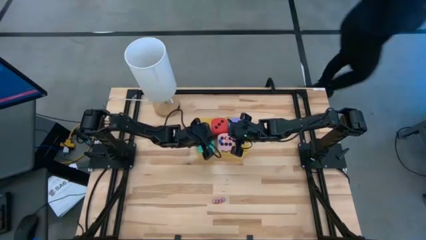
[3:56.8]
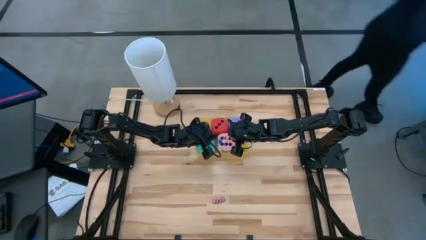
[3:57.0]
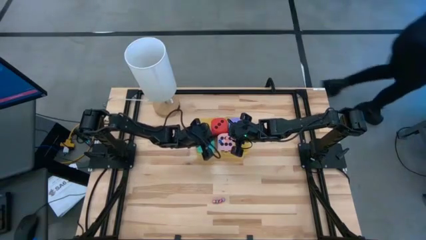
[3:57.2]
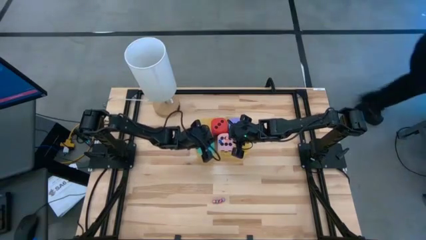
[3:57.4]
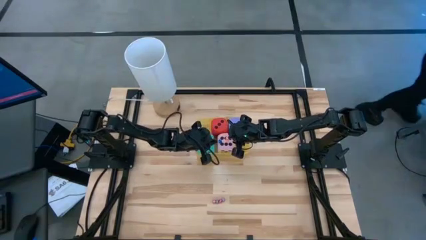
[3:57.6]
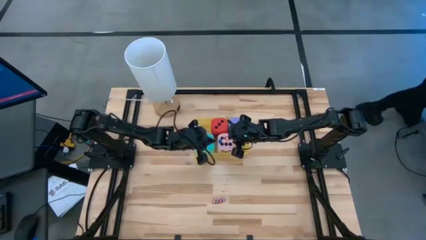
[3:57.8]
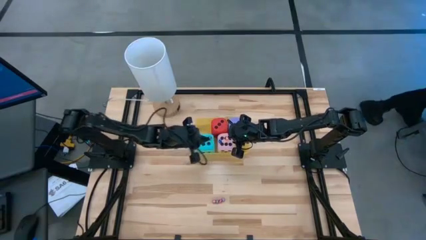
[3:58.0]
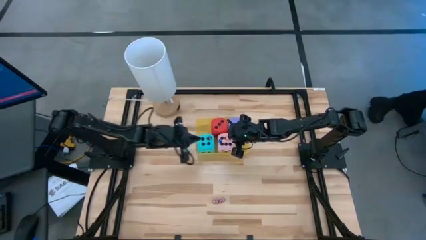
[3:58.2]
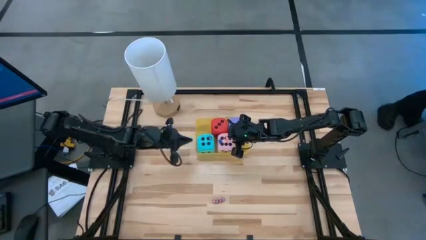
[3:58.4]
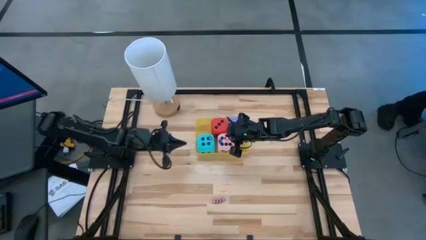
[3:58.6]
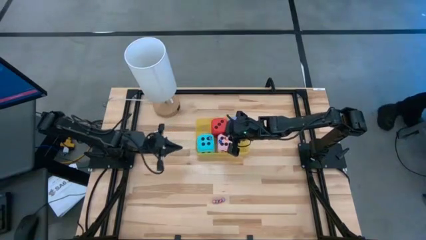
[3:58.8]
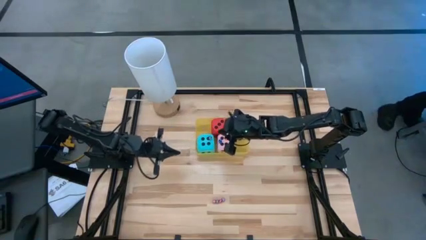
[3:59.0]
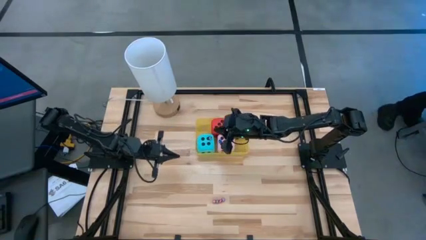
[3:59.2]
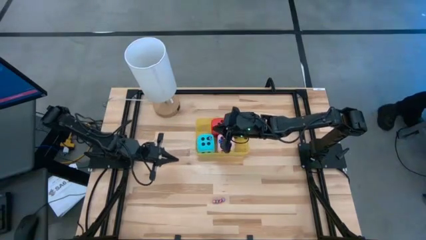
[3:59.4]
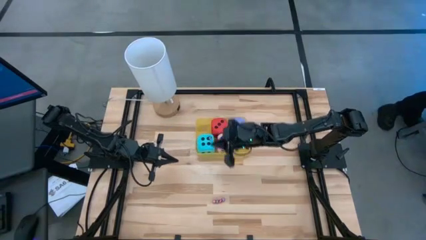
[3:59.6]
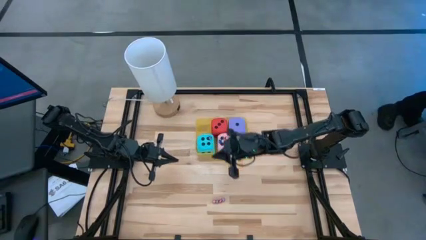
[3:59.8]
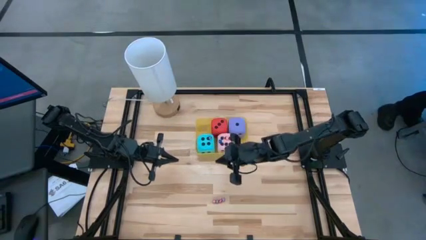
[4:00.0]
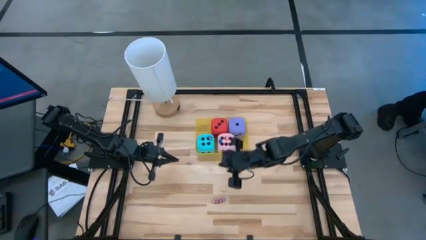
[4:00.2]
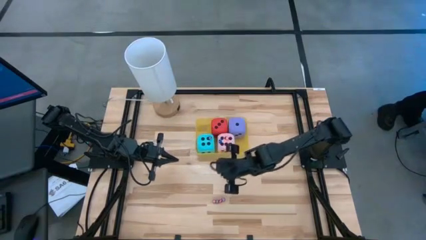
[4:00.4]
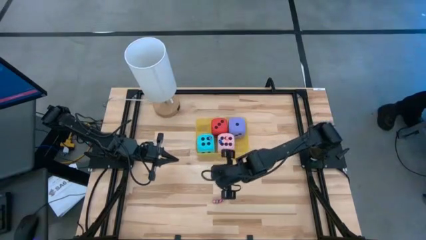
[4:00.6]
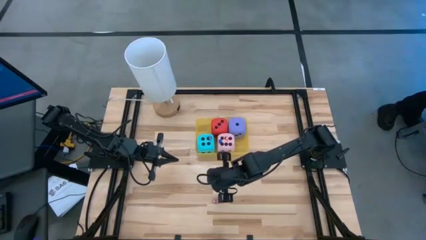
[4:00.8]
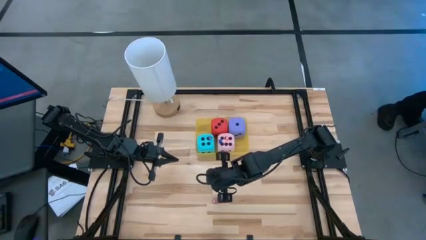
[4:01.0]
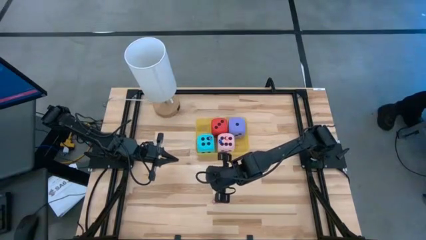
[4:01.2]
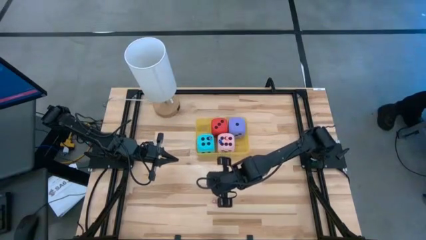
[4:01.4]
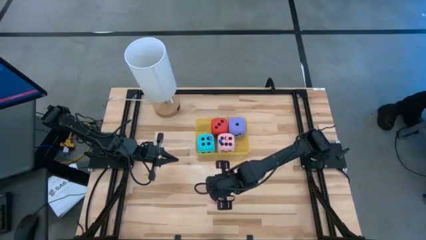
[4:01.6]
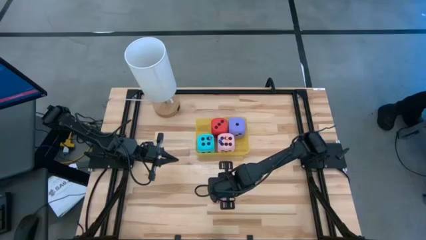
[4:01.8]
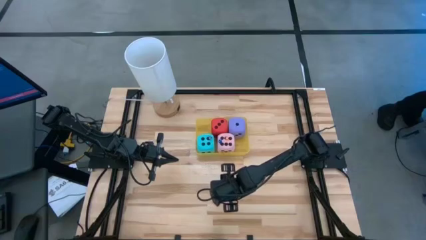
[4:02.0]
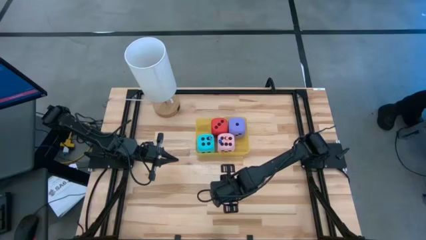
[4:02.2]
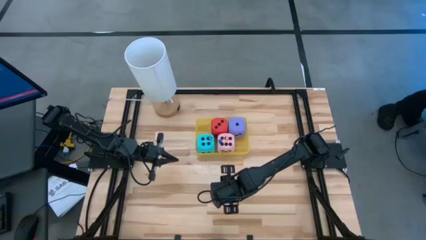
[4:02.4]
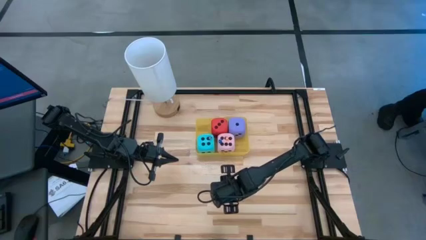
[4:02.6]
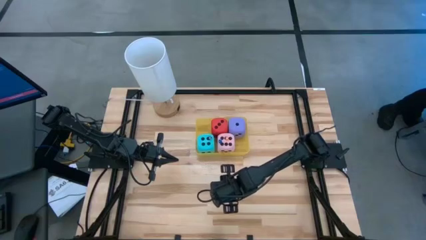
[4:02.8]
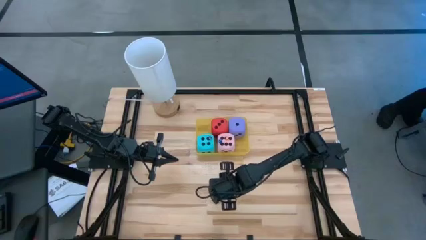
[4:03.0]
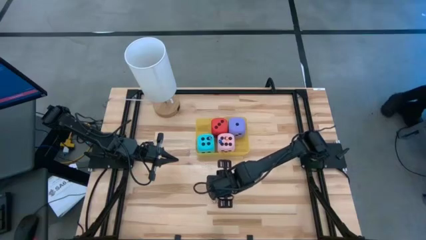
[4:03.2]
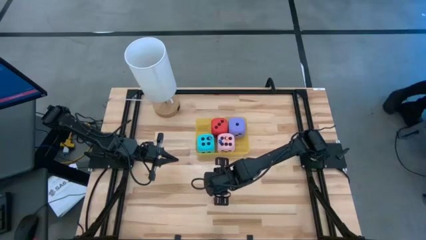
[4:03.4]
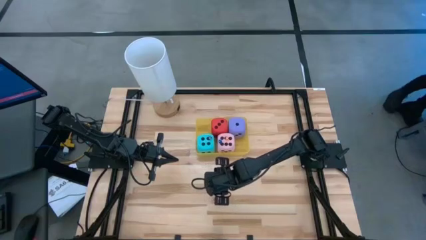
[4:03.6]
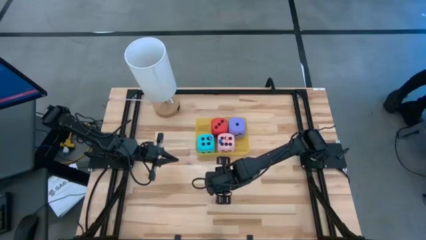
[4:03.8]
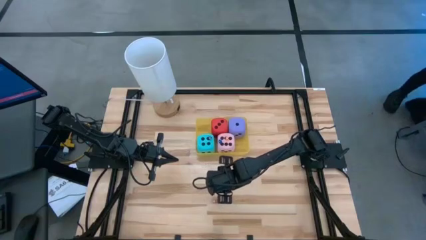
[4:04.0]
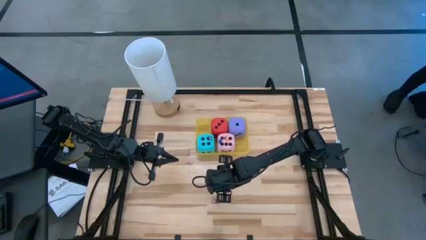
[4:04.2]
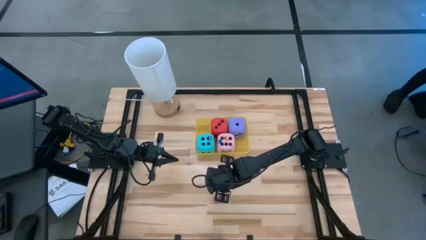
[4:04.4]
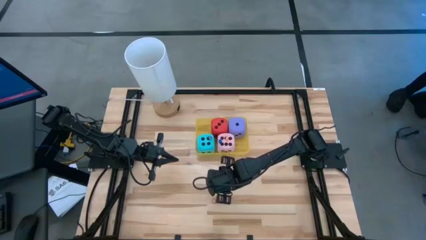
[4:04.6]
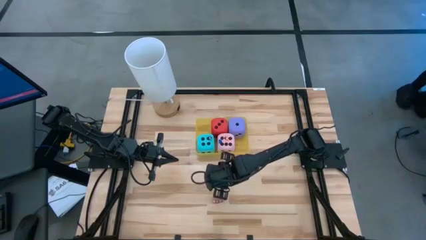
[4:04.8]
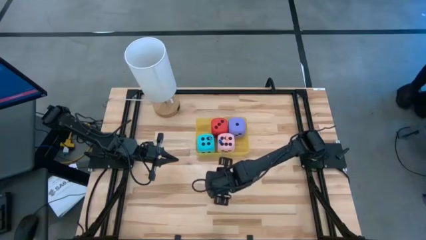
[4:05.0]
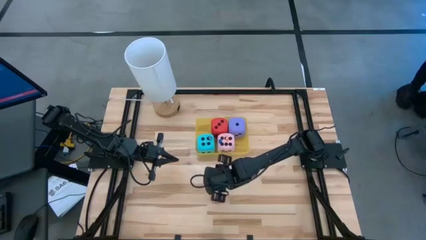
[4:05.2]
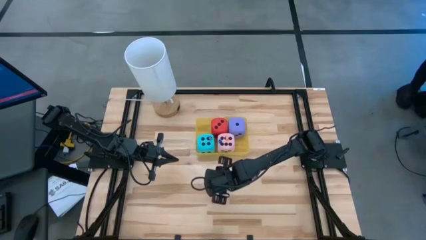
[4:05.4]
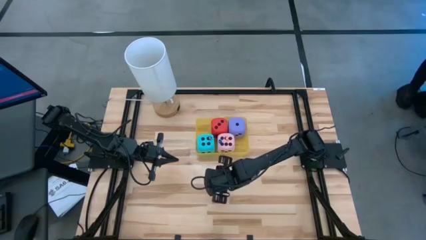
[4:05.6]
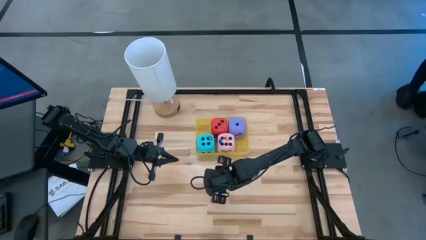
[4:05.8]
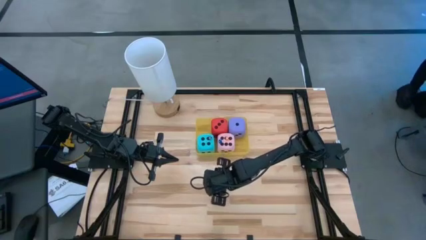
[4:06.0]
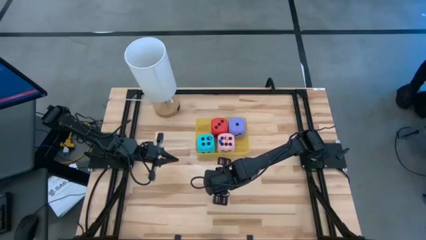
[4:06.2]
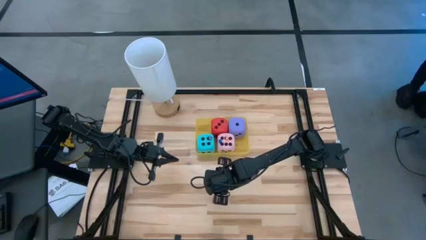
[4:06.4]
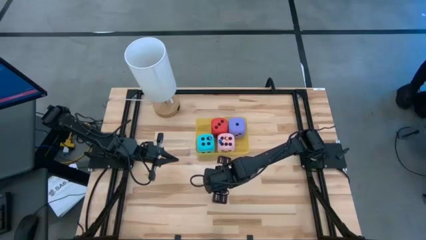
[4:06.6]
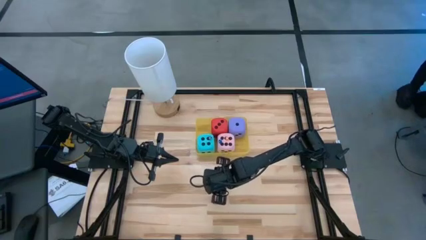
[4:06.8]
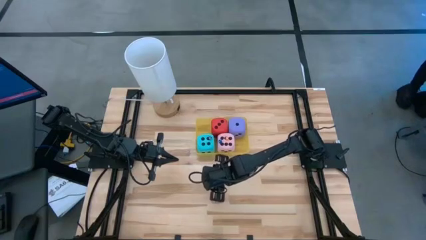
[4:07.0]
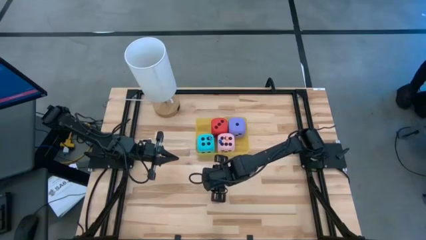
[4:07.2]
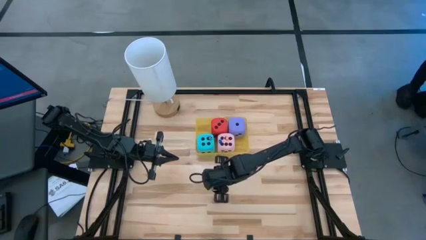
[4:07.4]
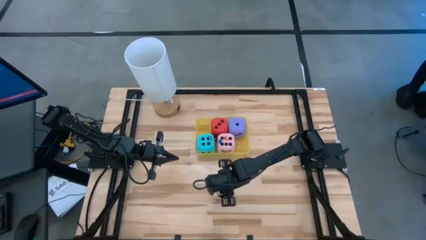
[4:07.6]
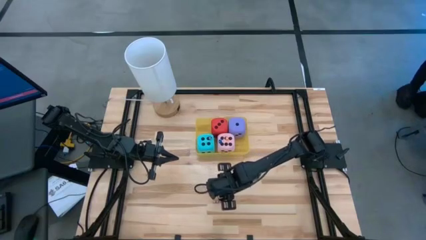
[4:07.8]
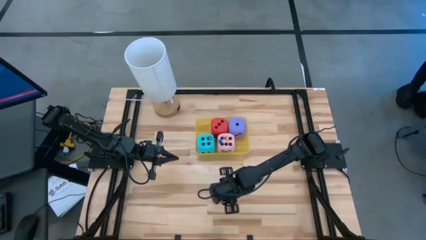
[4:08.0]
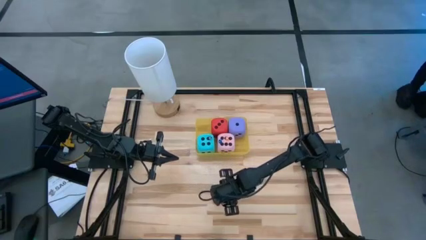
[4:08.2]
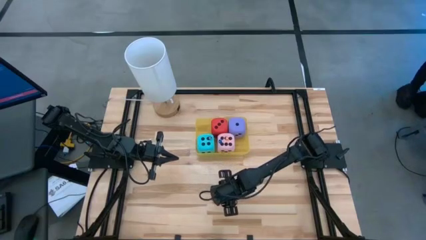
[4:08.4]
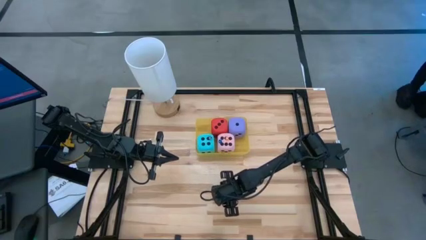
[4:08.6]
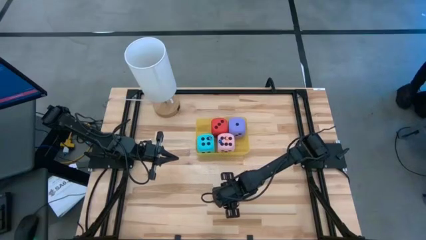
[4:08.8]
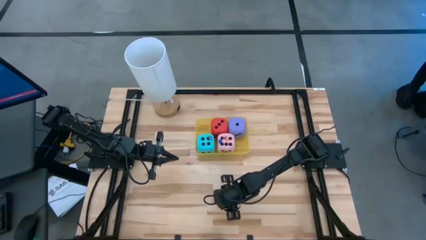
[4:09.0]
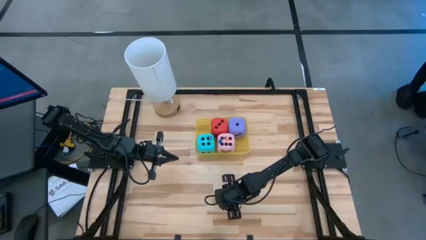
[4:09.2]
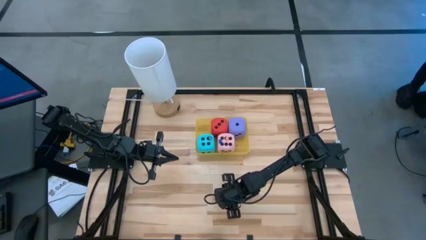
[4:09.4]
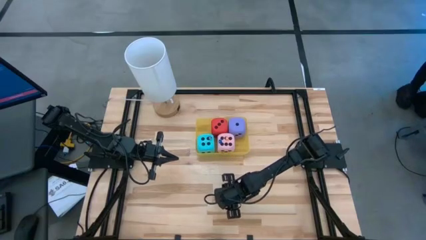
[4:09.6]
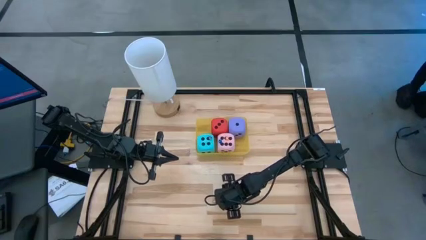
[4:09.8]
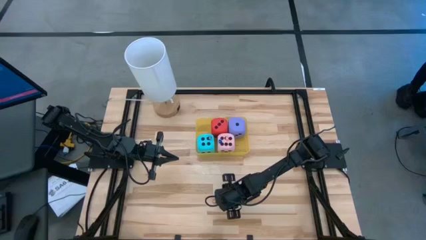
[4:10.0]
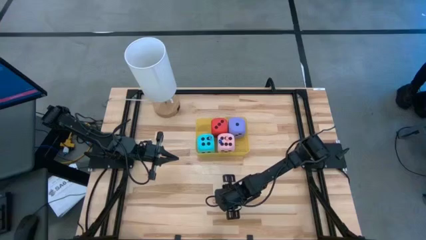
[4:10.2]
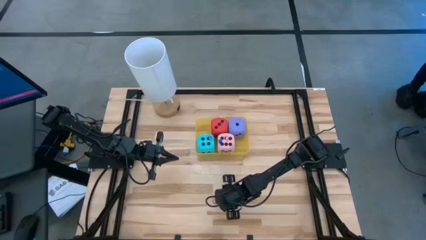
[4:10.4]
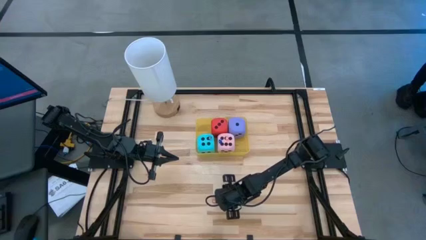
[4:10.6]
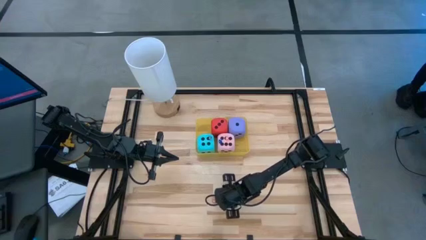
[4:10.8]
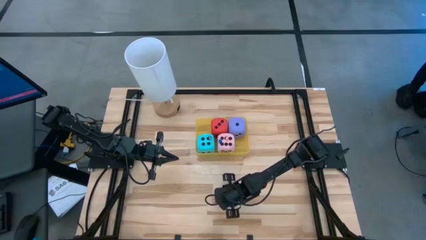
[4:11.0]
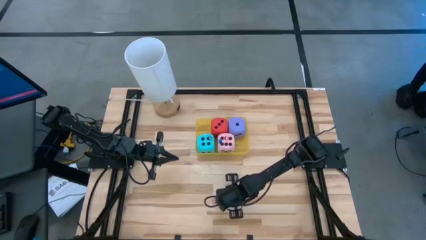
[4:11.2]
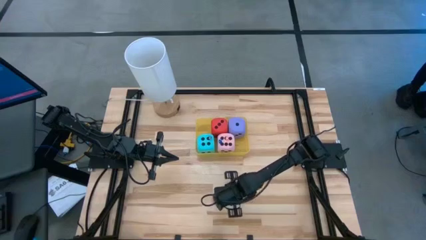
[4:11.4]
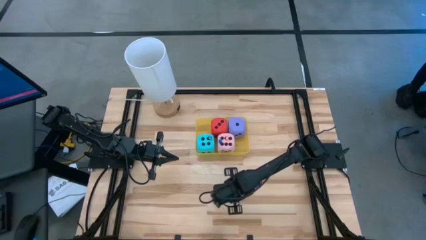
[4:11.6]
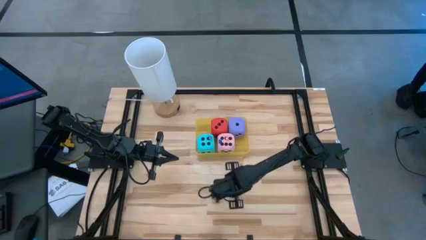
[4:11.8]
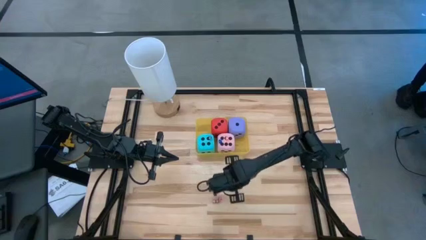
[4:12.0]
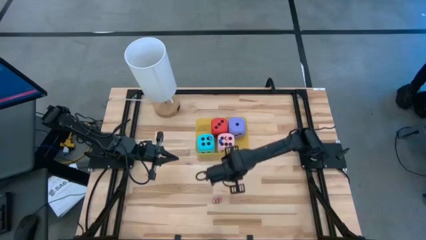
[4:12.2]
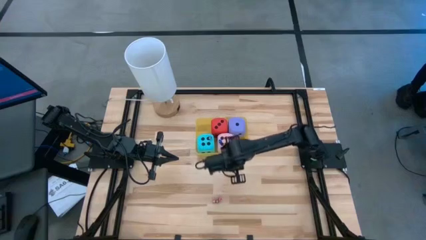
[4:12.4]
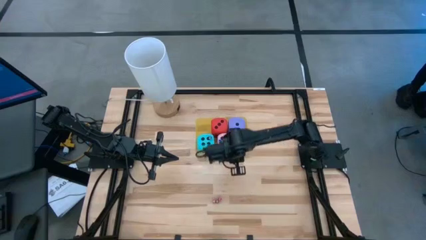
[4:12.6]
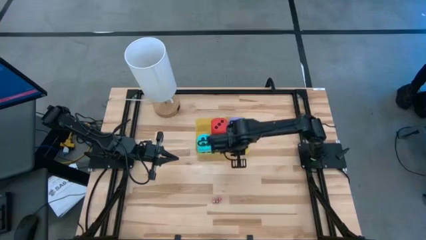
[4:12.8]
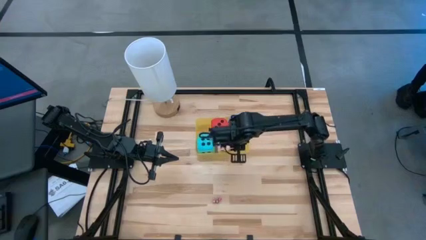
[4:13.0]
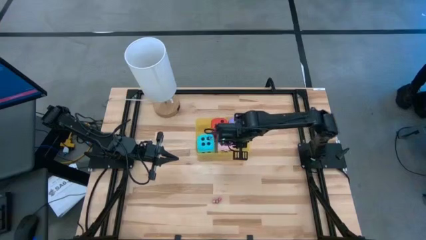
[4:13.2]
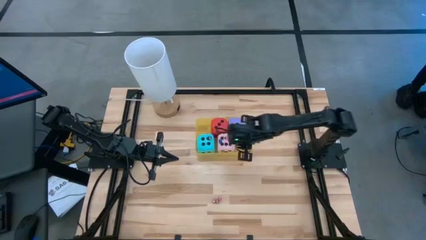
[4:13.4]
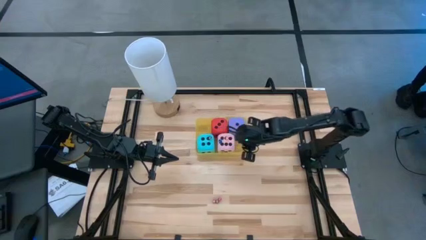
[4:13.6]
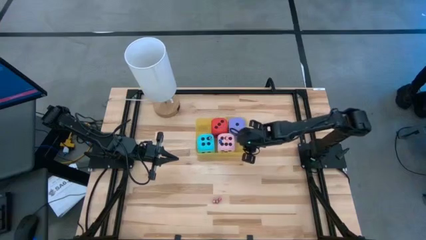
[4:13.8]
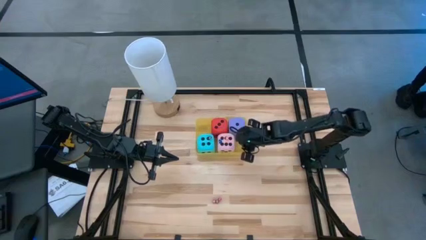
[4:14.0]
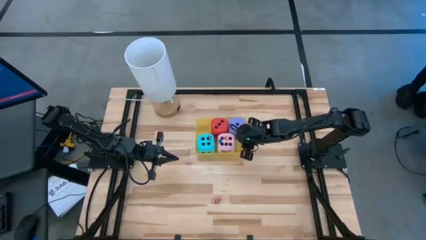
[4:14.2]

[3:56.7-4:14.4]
Task: Pick & Place Dice
Put the small purple dice into the yellow bin
